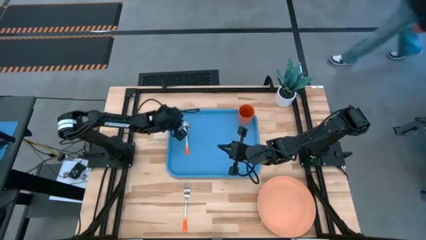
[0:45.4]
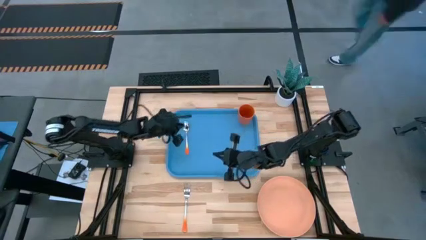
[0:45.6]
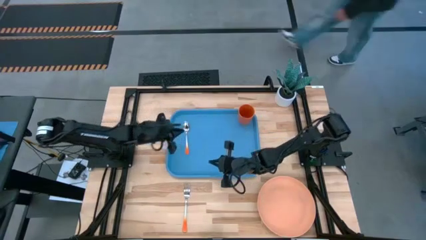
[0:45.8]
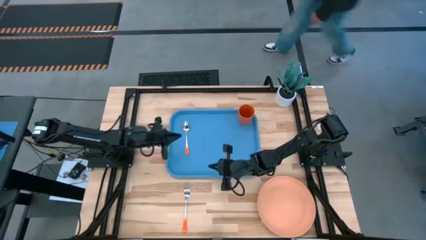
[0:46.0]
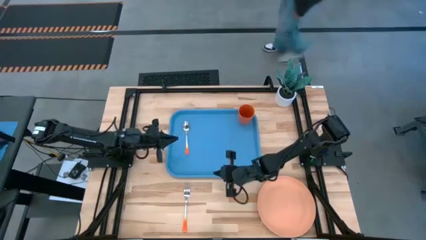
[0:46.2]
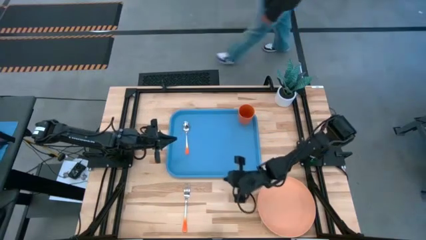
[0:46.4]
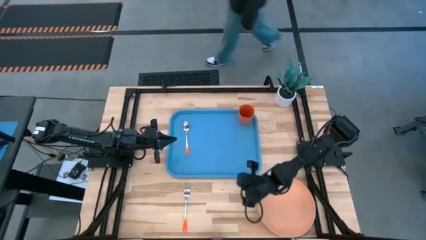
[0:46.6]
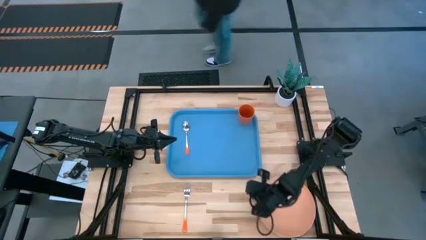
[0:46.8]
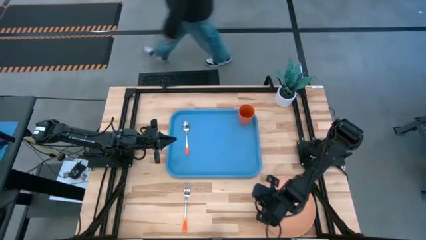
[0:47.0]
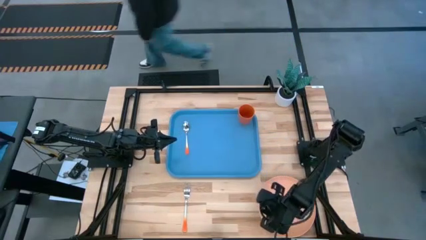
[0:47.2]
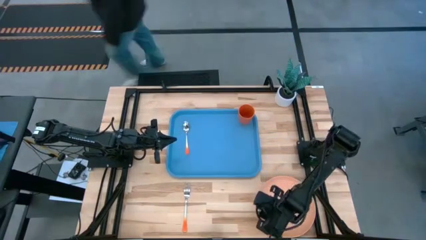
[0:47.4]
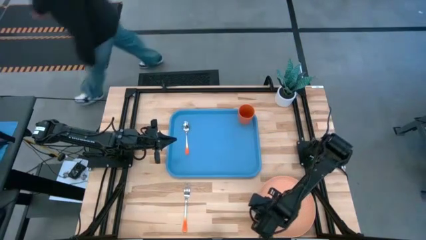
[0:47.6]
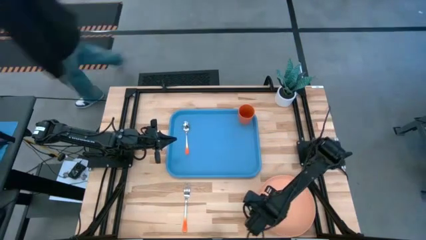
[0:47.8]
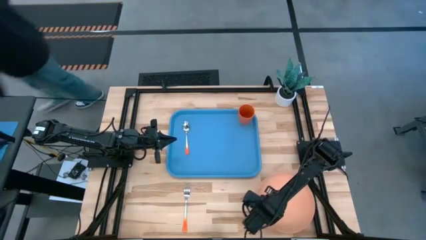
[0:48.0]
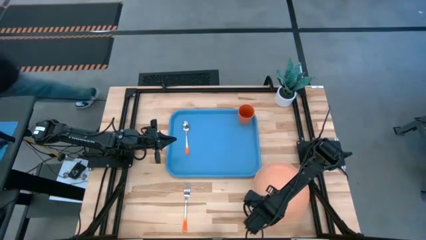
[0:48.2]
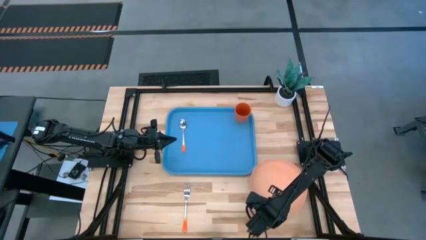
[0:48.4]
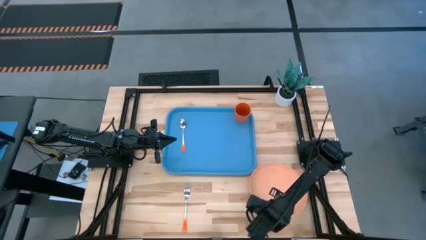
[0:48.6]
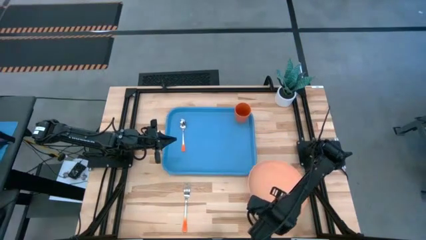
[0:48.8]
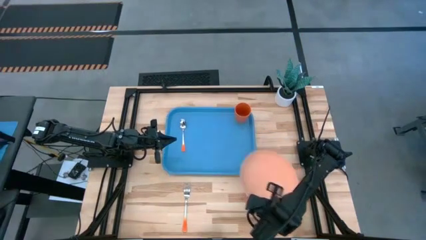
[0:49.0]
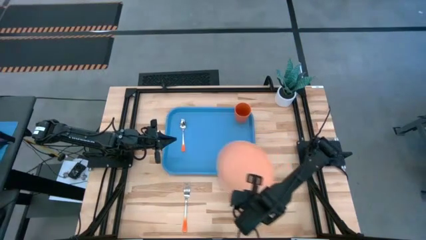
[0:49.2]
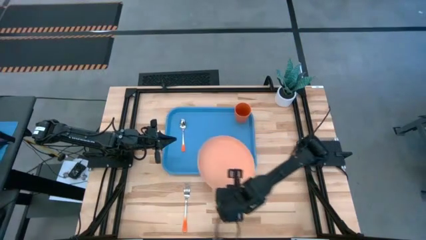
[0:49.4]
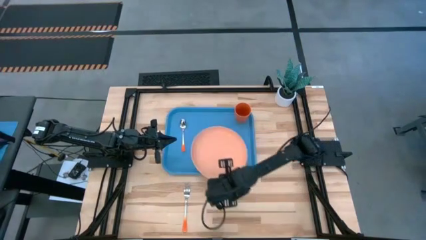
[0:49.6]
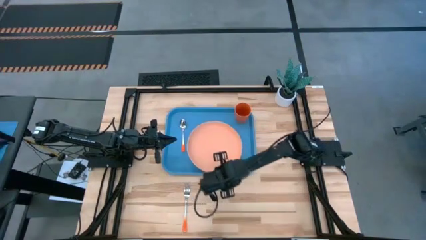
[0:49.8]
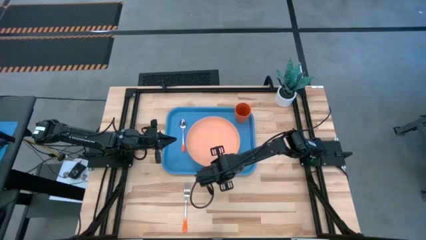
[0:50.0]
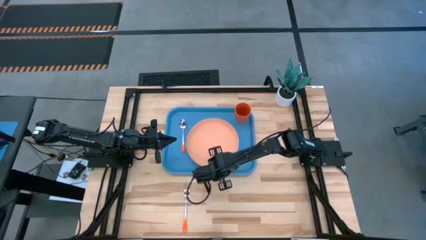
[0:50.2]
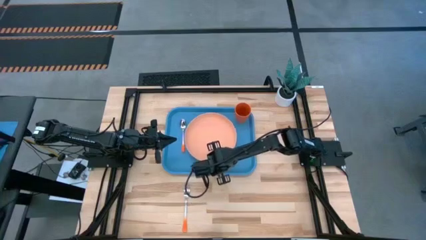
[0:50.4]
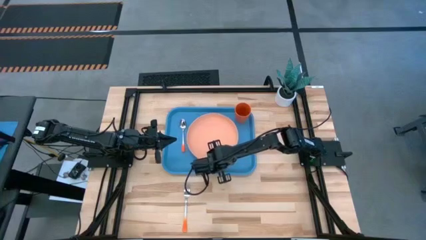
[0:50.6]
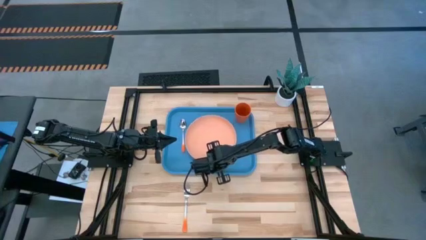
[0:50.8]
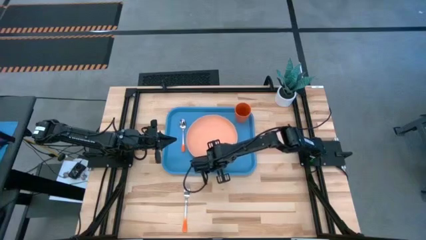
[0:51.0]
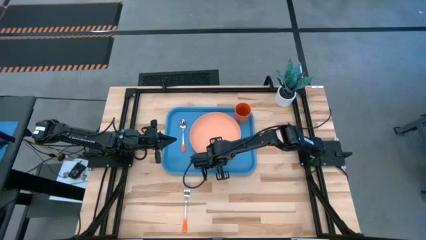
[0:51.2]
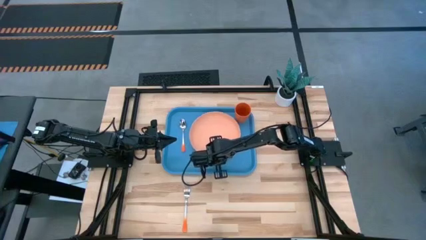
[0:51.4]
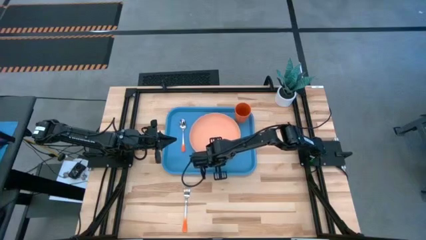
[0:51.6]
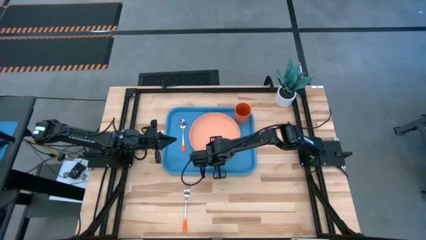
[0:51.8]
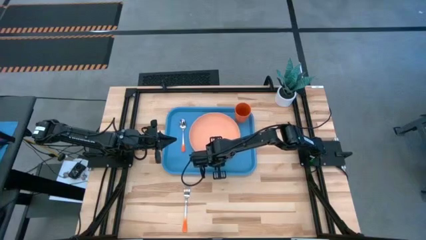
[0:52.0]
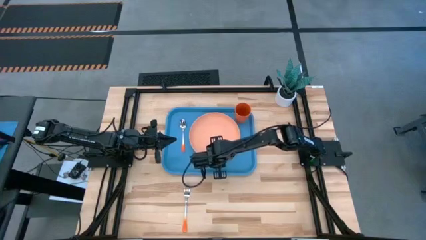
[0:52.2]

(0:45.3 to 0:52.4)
Task: Pick and place plate/cup/fork/spoon on tray
Put the orange plate on the blue tray to the right of the orange spoon

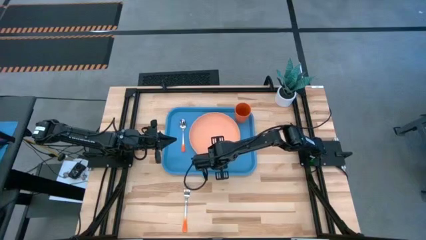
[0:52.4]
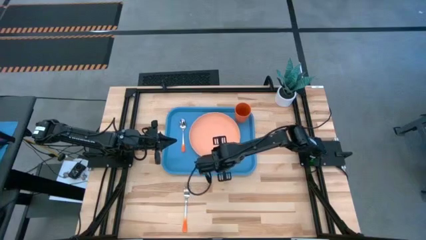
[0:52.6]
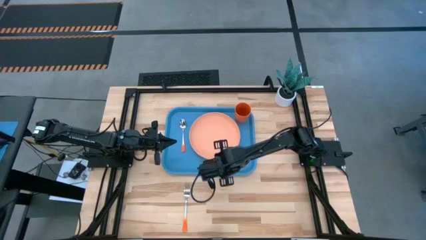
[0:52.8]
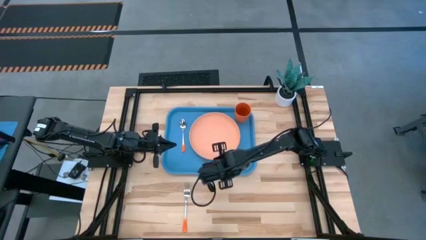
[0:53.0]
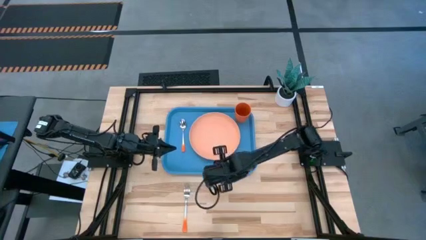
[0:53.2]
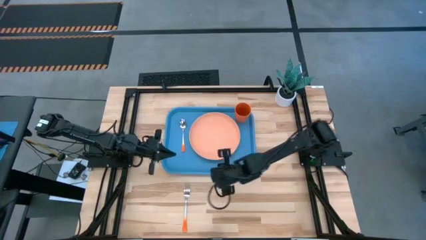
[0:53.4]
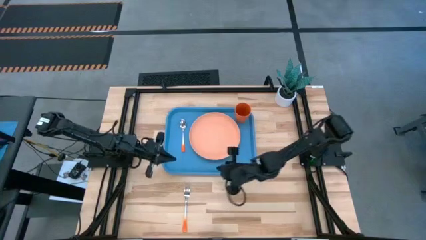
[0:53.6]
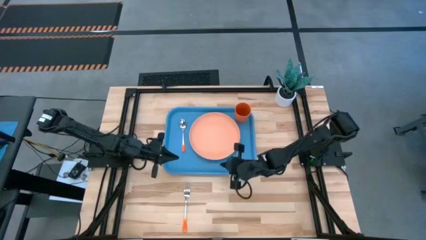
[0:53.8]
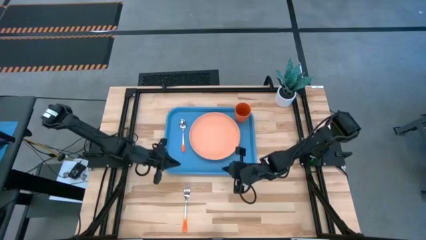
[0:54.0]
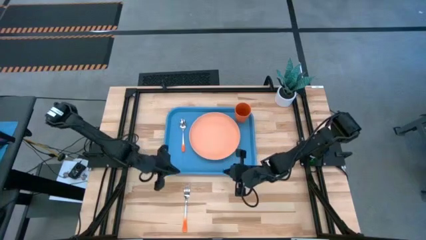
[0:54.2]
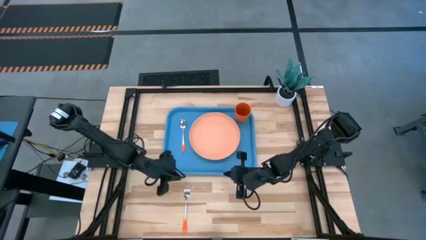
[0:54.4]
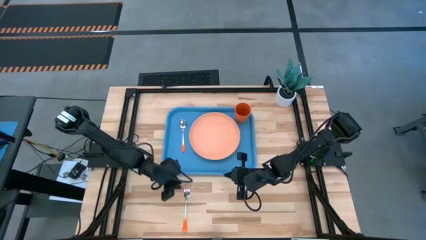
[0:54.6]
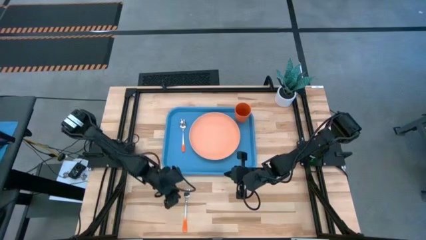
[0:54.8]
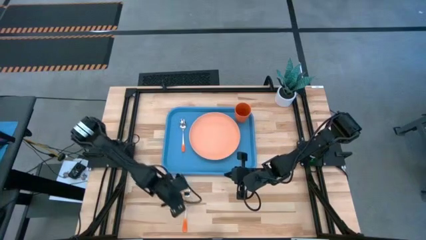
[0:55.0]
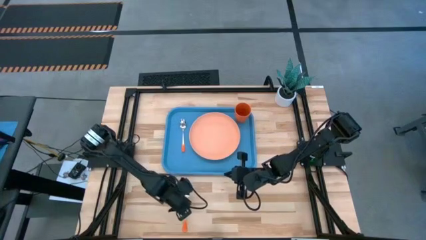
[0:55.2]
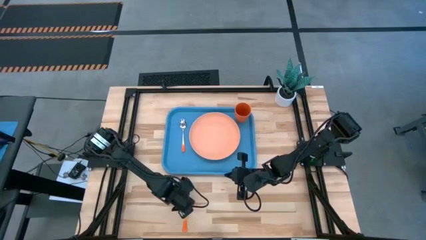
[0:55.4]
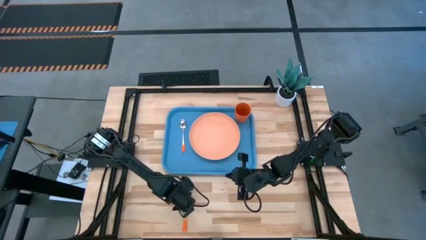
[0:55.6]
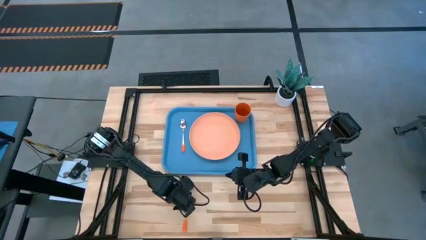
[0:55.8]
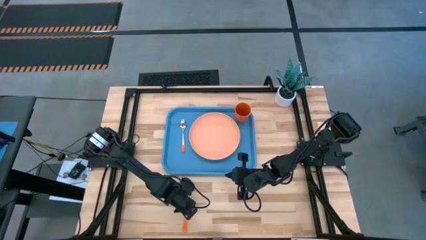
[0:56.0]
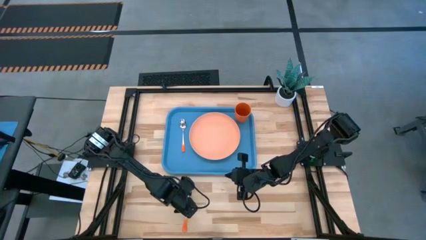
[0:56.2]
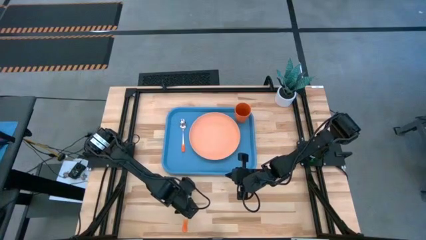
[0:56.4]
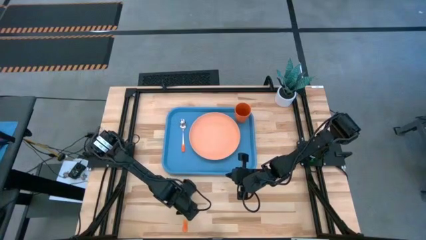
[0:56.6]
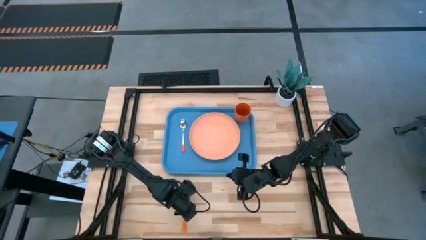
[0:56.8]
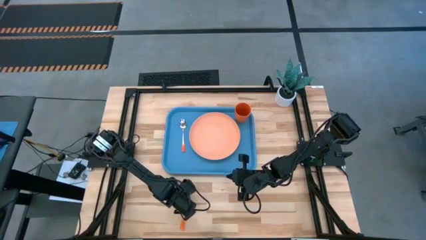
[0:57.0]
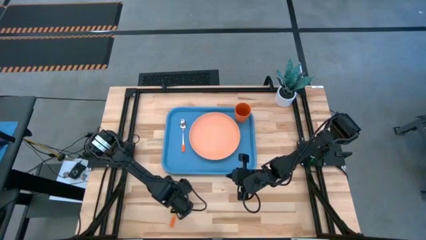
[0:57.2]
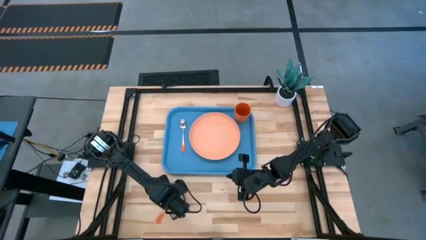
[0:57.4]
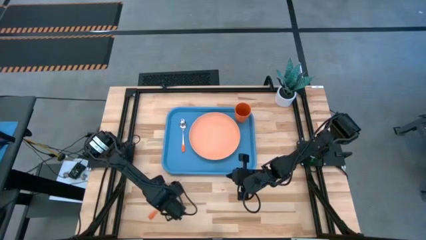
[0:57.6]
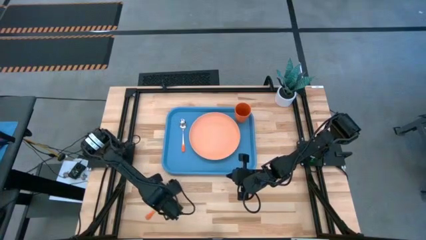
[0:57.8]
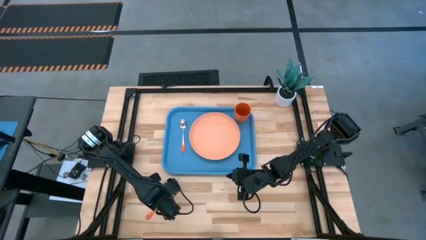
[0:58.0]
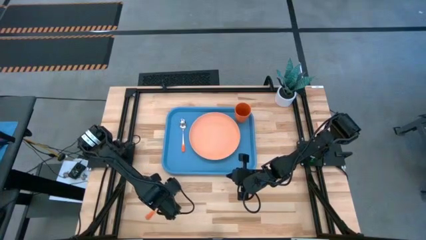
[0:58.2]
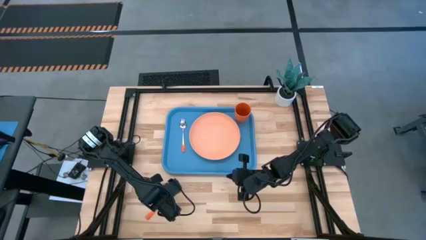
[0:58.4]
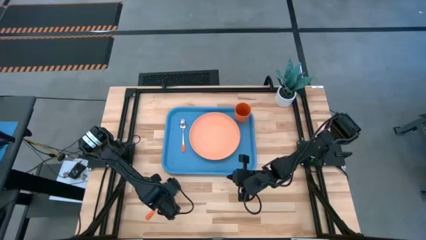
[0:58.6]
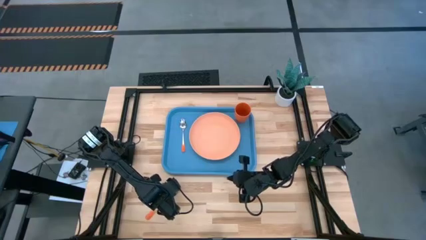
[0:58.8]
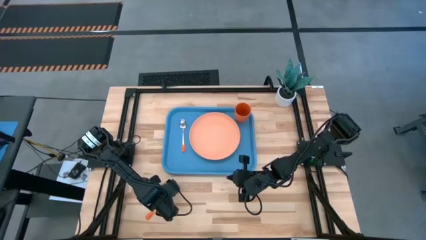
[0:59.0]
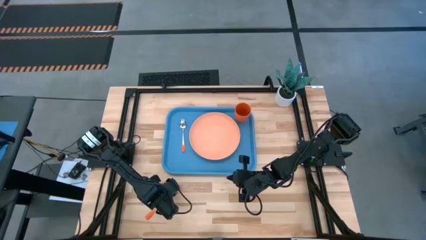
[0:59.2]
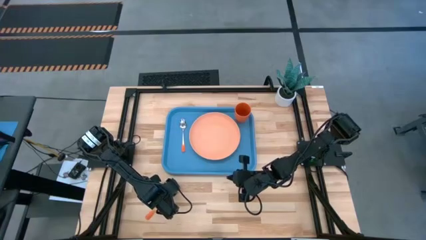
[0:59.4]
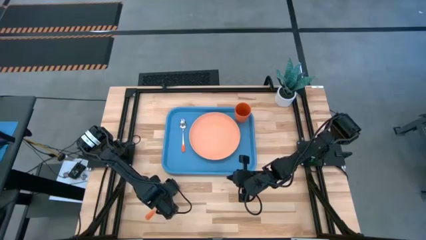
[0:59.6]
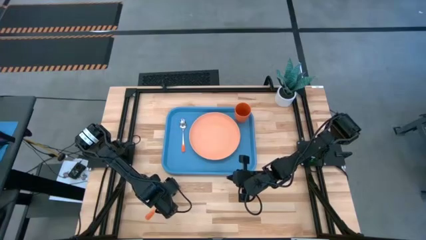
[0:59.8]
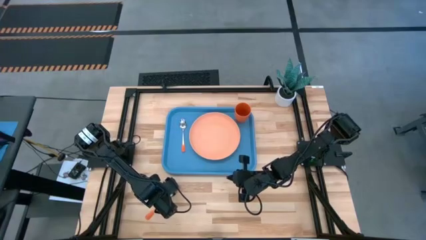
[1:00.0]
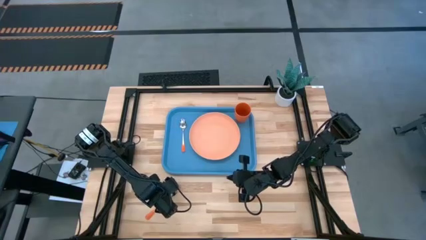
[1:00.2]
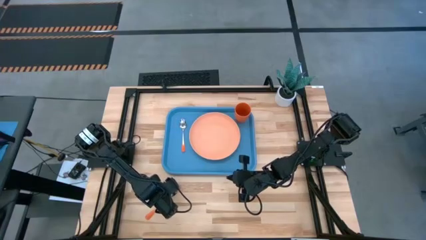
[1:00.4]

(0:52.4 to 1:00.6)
Put the orange fork on the blue tray to the left of the orange spoon

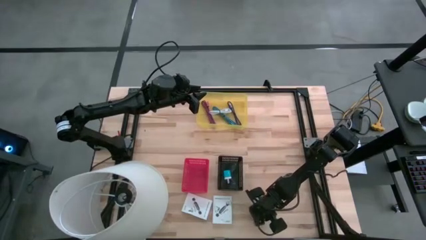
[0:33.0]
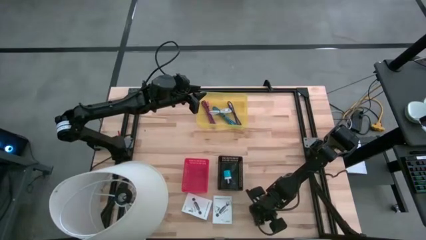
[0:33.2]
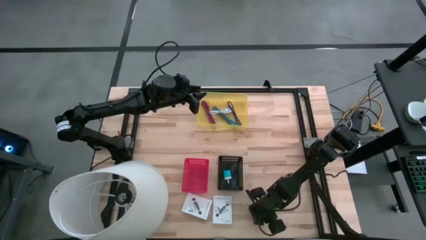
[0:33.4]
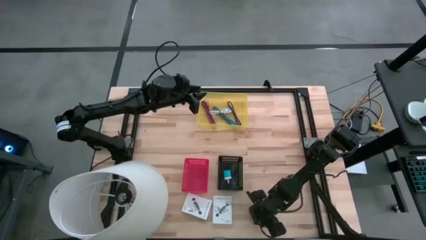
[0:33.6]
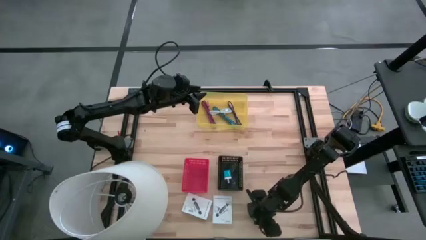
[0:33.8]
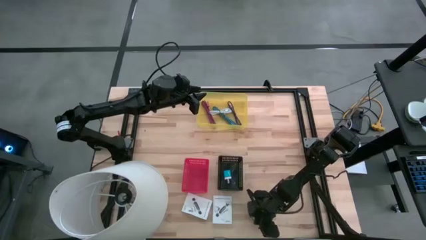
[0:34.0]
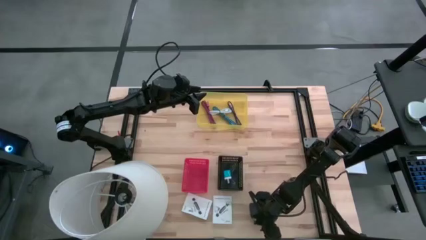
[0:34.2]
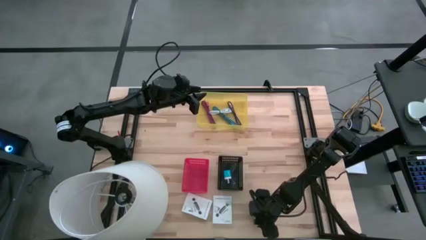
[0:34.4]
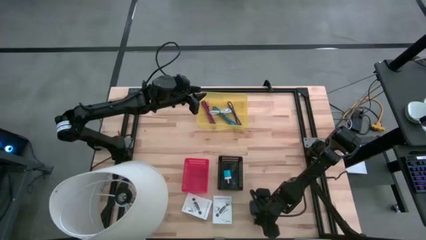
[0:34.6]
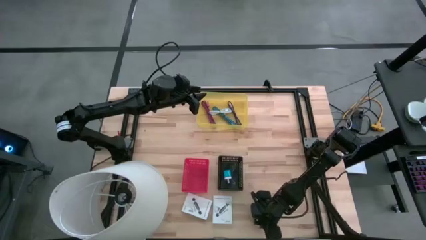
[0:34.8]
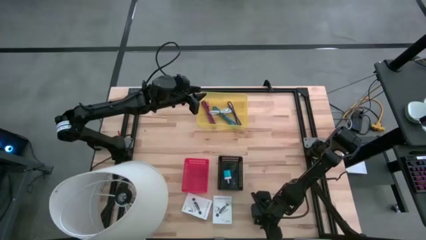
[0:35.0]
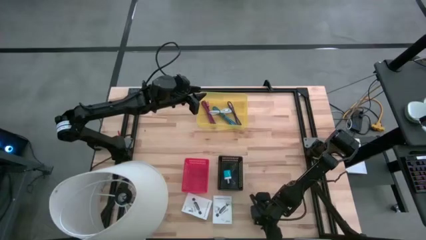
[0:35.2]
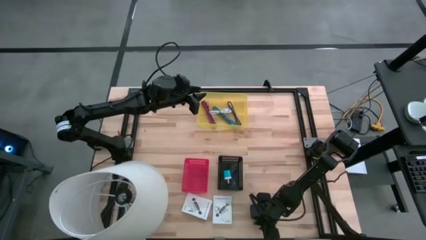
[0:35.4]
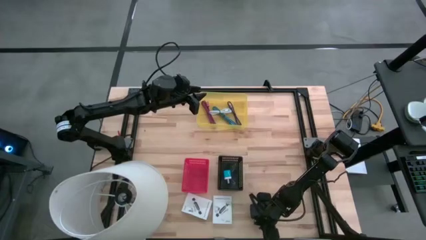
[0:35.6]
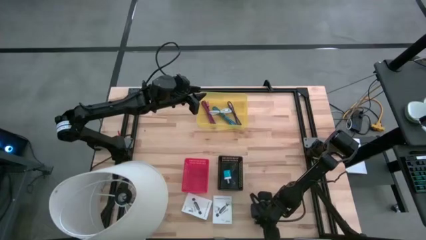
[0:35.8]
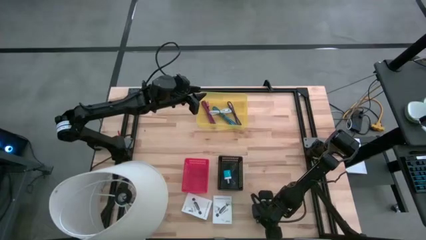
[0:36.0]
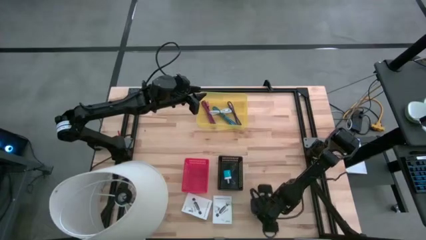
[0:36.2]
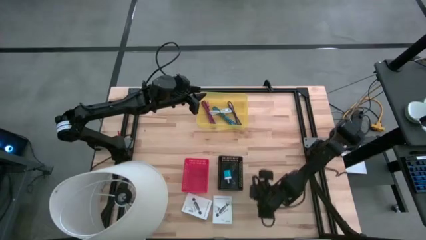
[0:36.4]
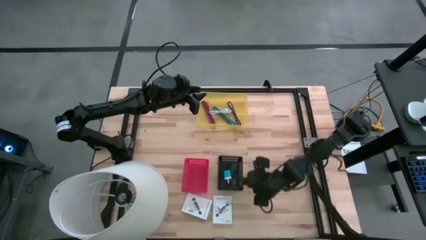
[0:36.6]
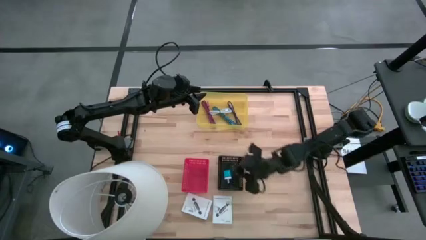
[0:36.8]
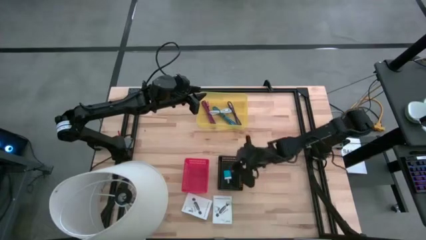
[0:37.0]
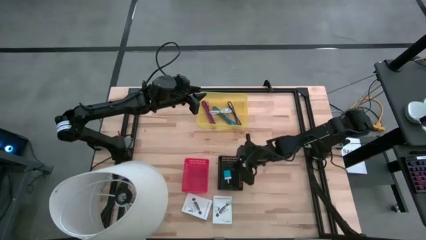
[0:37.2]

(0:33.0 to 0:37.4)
Task: Pick and place items into bin
Put the black charger adapter into the black bin
